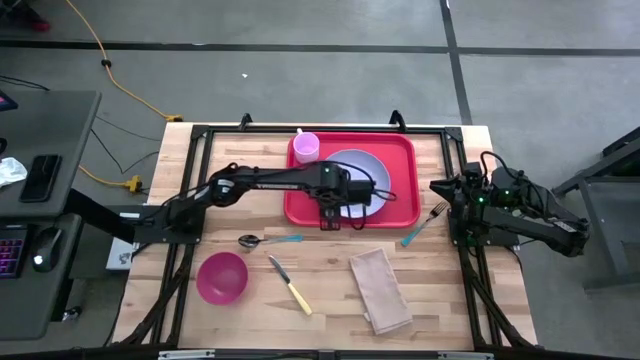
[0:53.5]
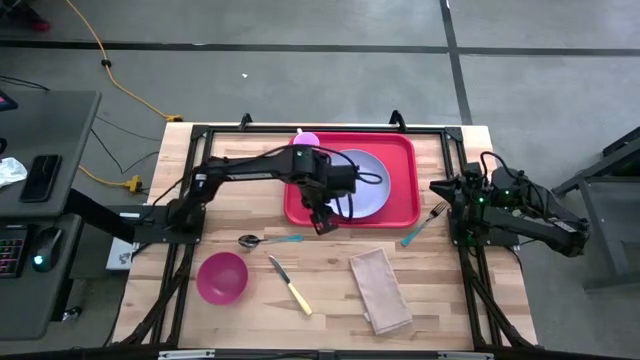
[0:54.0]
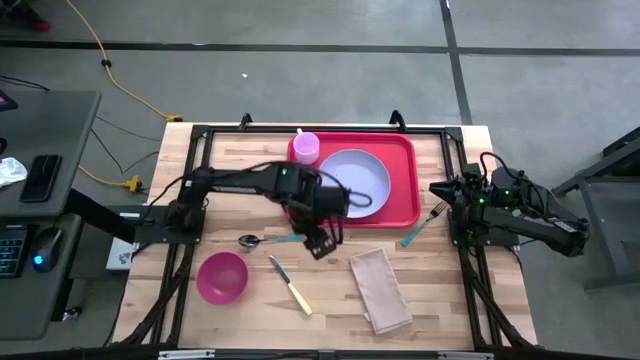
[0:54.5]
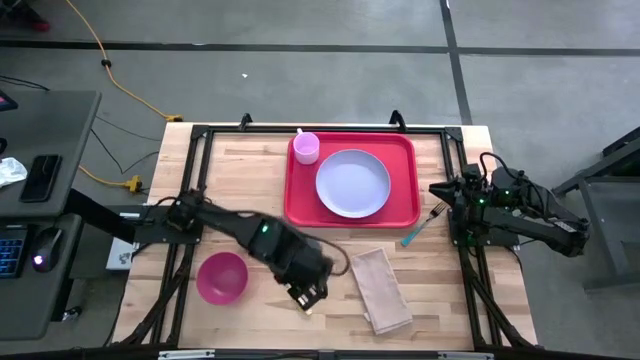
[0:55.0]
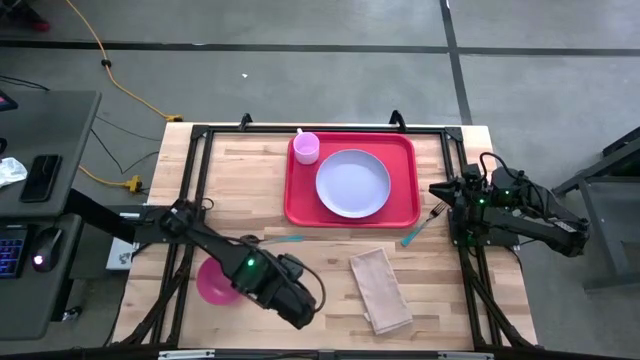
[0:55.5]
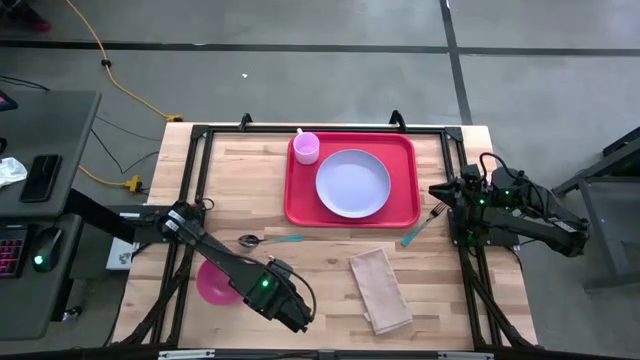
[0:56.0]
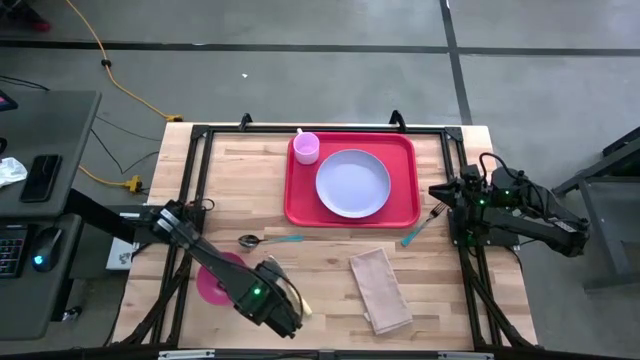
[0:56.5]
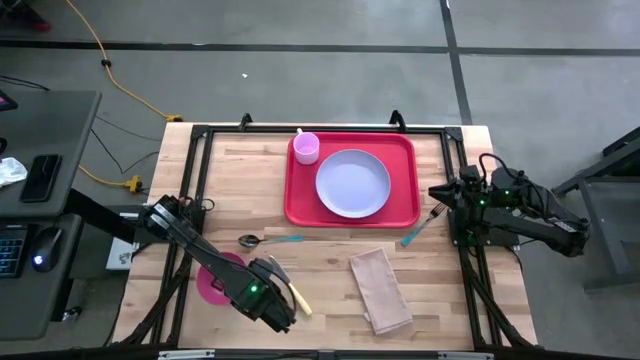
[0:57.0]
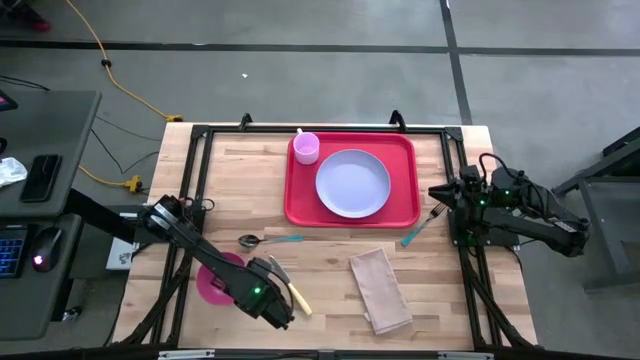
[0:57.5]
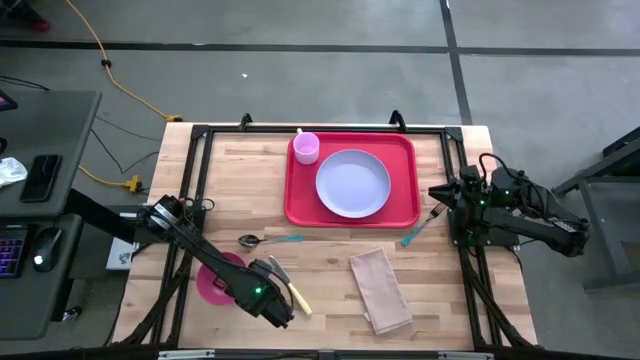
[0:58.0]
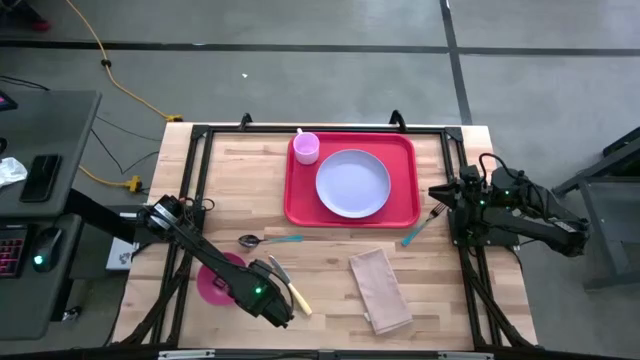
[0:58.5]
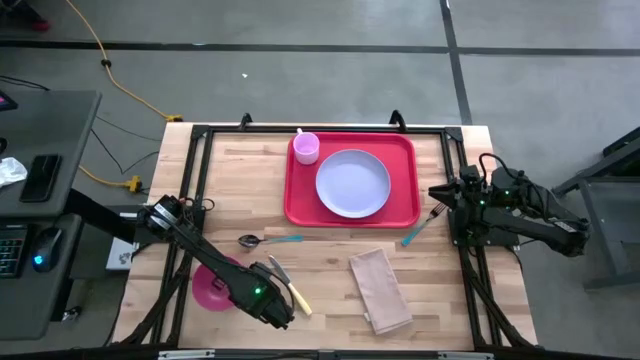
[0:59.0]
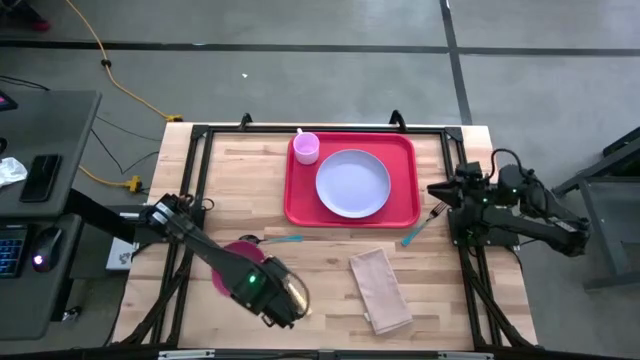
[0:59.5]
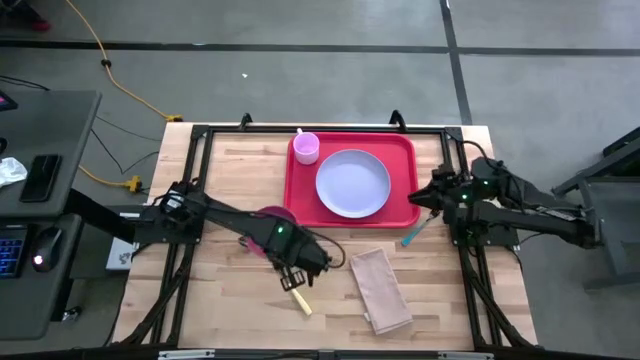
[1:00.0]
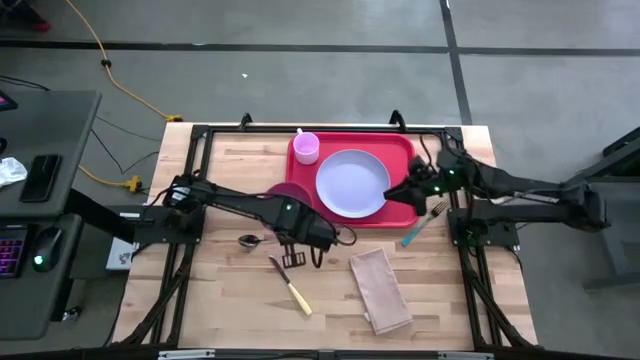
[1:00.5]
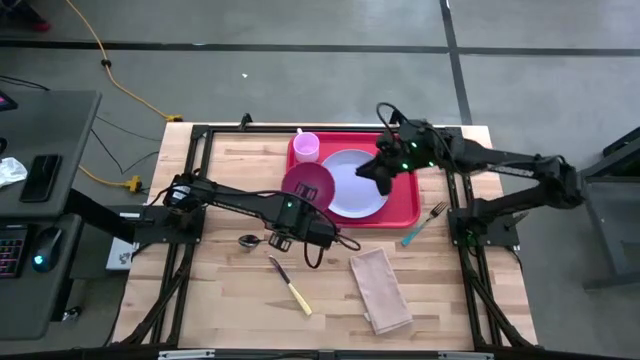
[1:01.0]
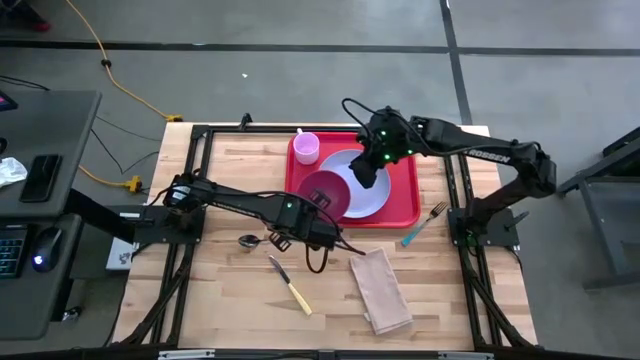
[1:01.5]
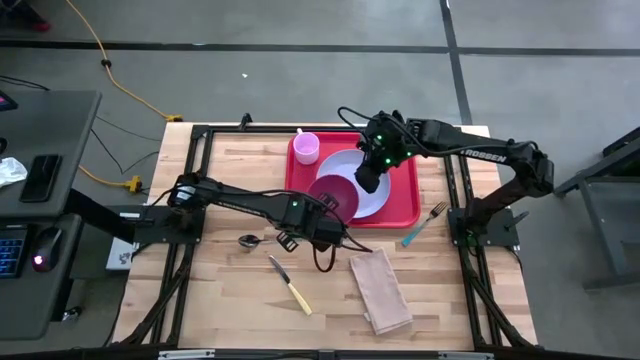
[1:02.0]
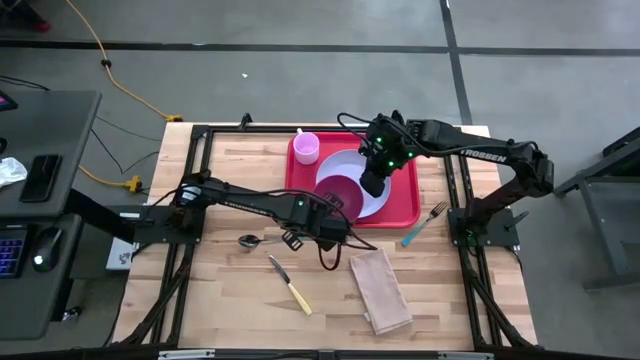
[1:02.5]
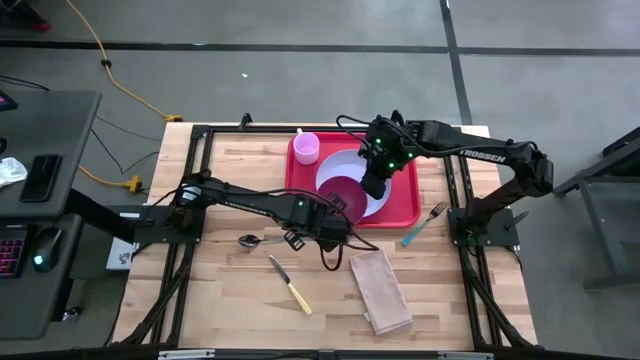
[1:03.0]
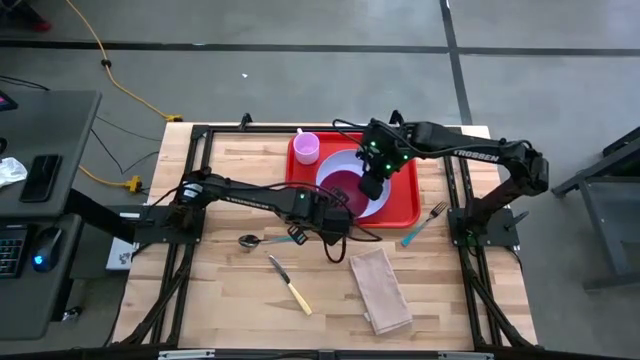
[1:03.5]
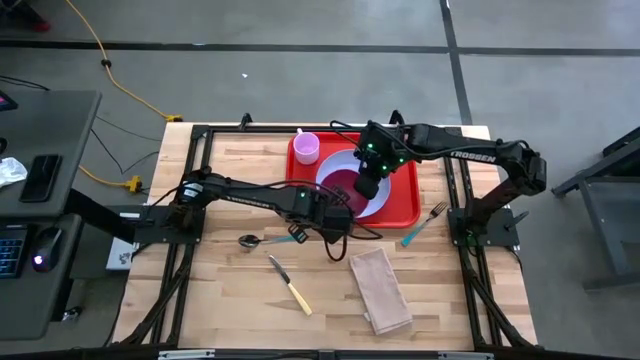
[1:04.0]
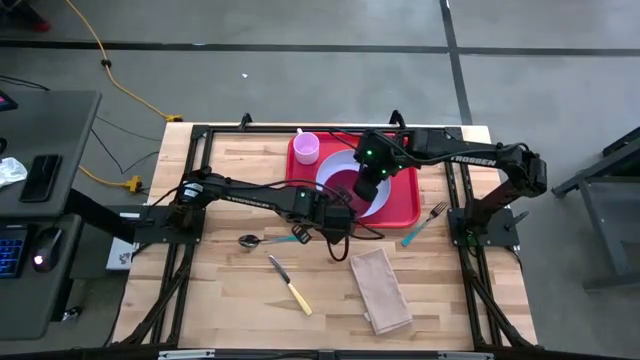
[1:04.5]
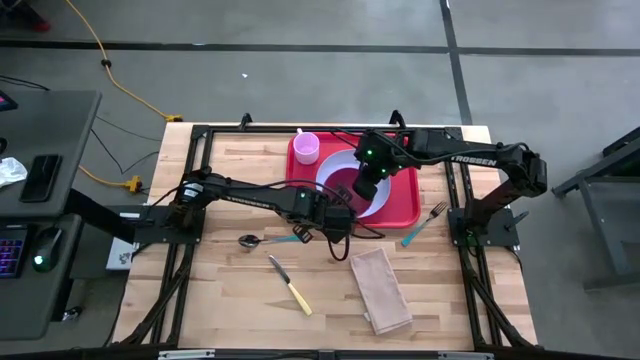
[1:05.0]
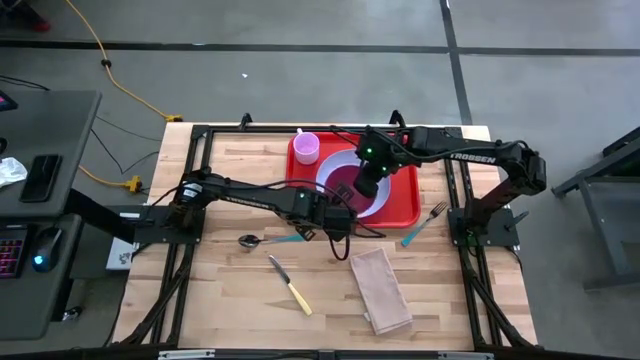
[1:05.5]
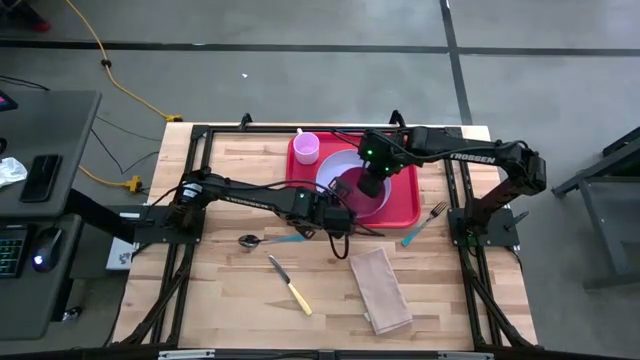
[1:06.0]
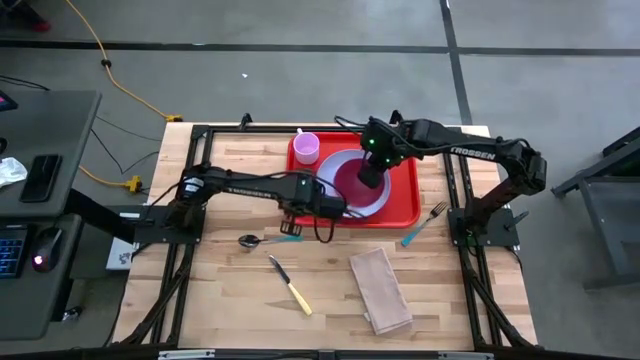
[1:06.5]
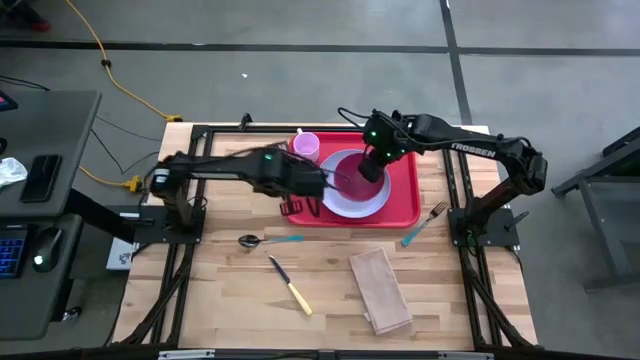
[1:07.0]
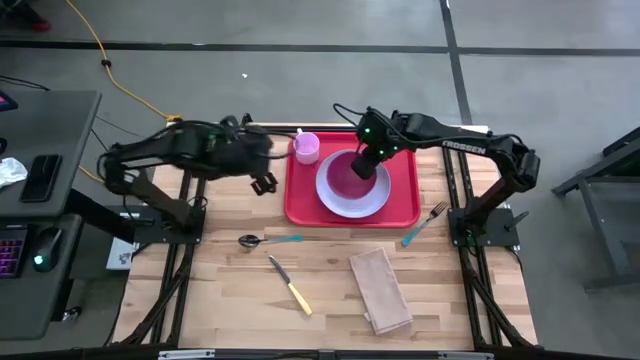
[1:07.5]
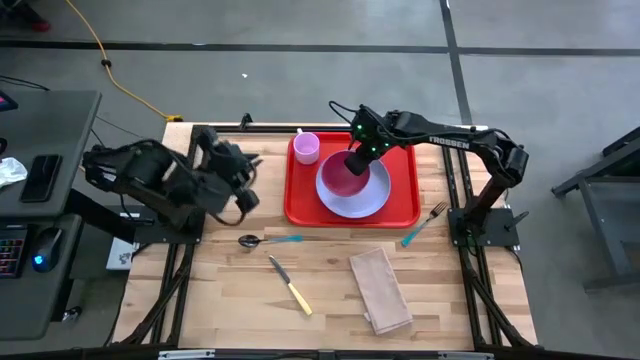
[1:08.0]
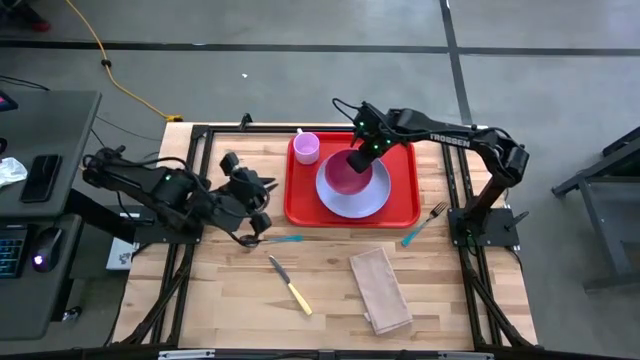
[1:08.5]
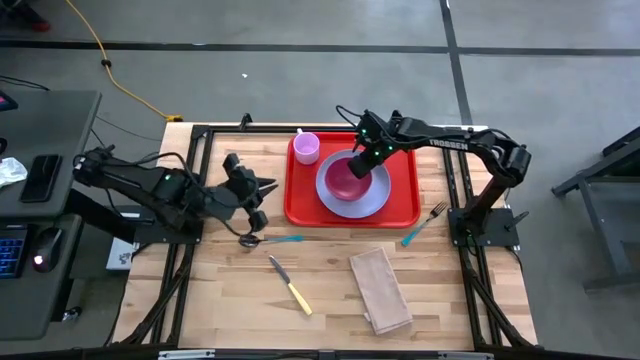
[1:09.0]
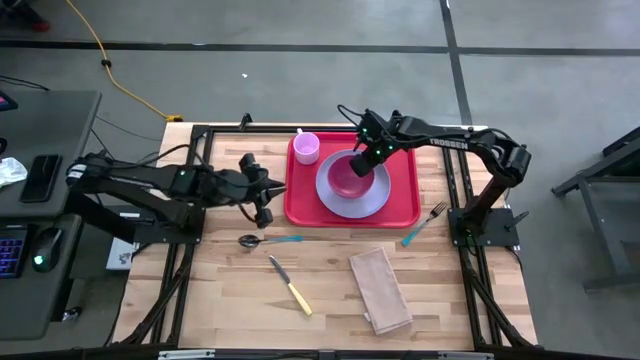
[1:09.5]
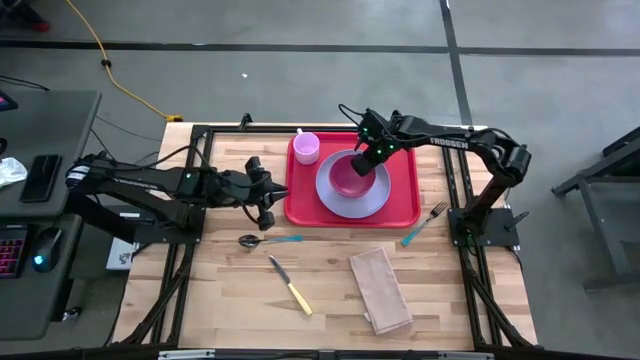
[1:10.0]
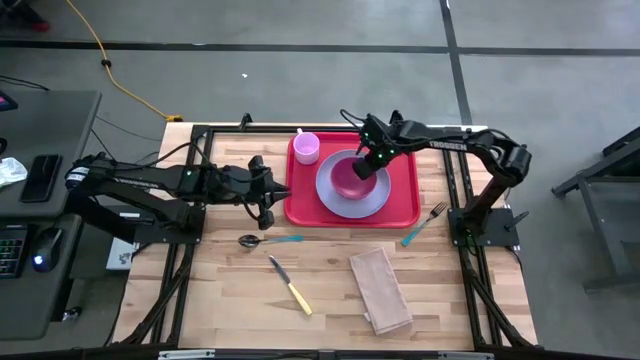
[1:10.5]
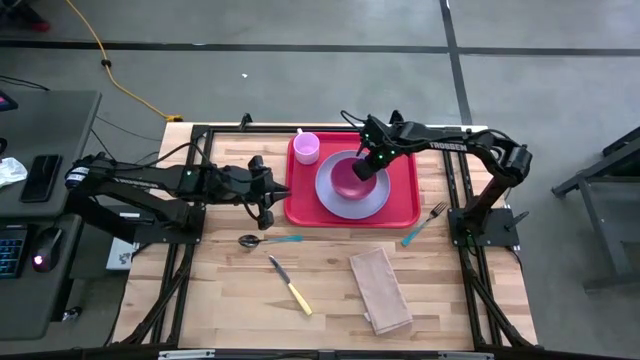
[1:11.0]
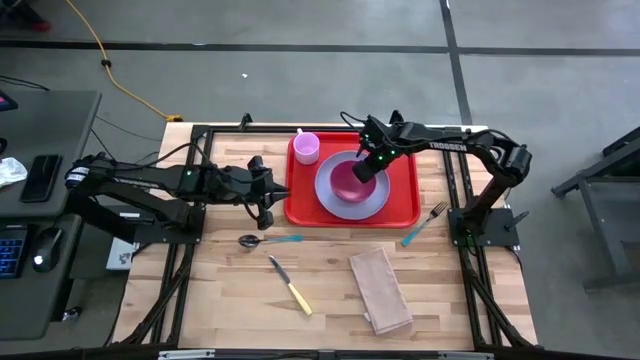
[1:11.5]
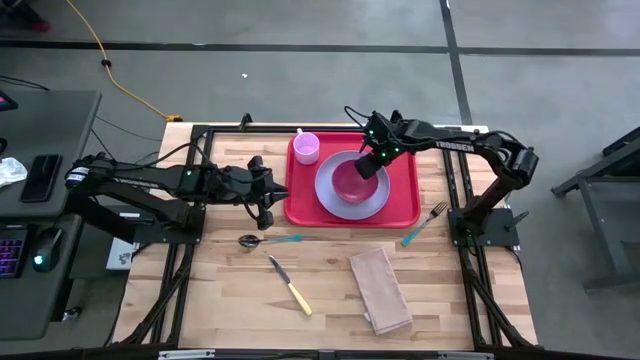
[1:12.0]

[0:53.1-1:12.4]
Task: Set up tray
Put the pink bowl on top of the purple plate on the red tray

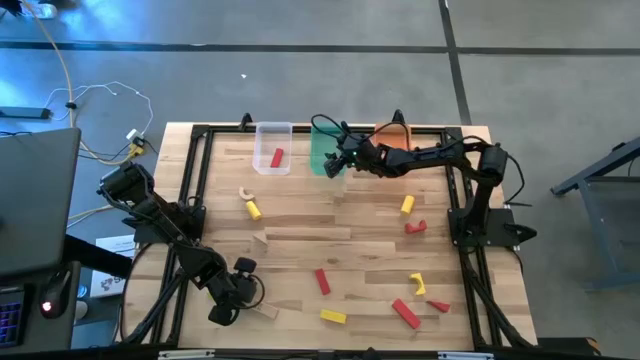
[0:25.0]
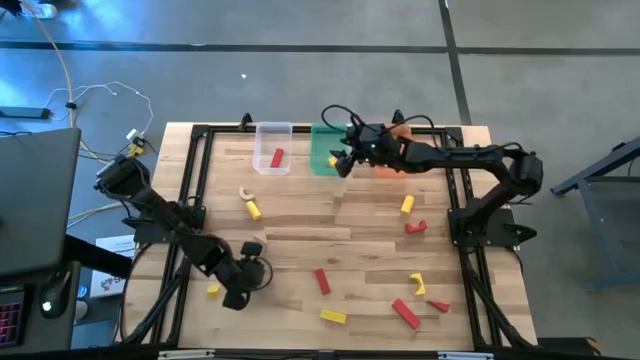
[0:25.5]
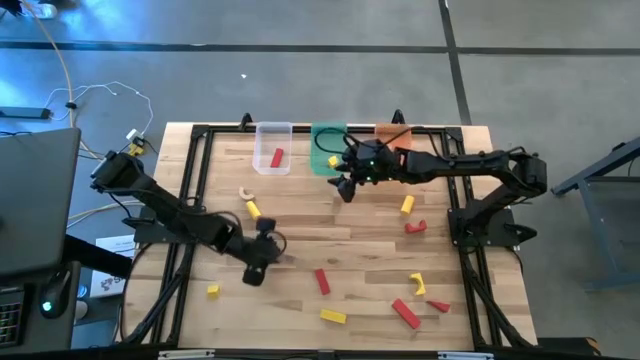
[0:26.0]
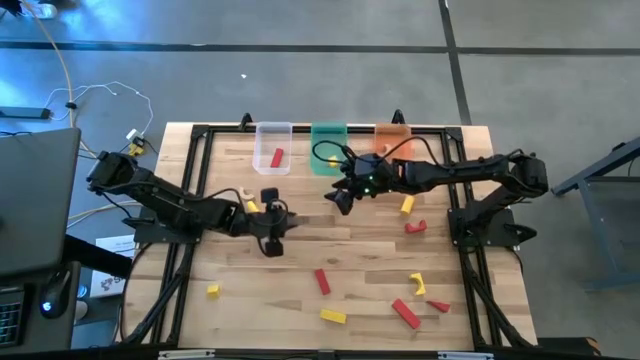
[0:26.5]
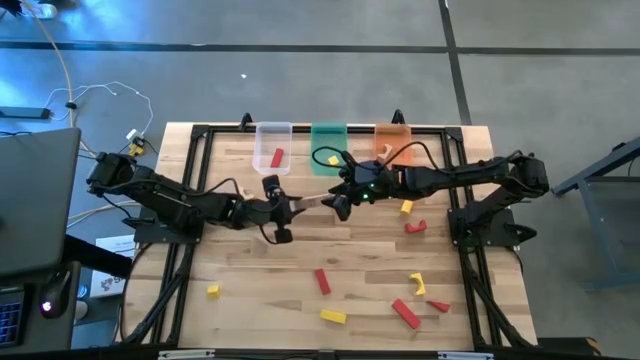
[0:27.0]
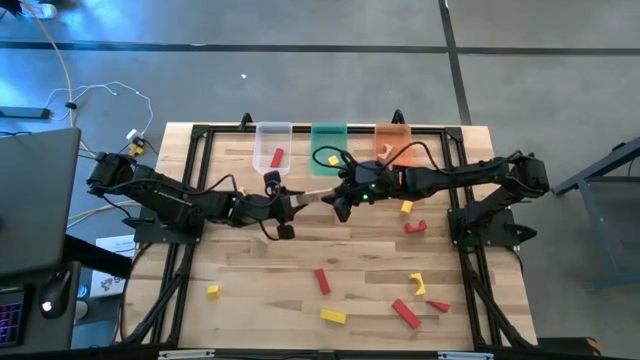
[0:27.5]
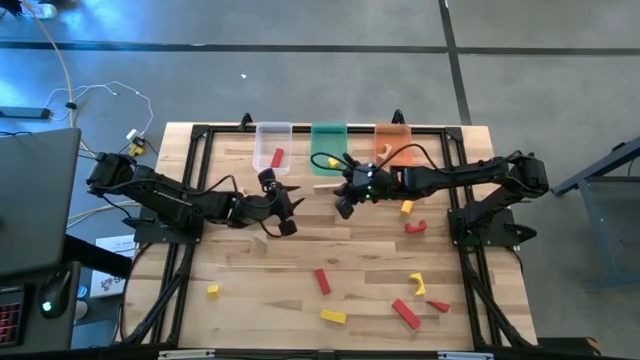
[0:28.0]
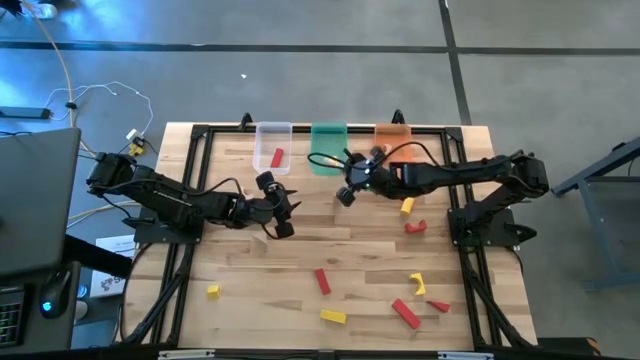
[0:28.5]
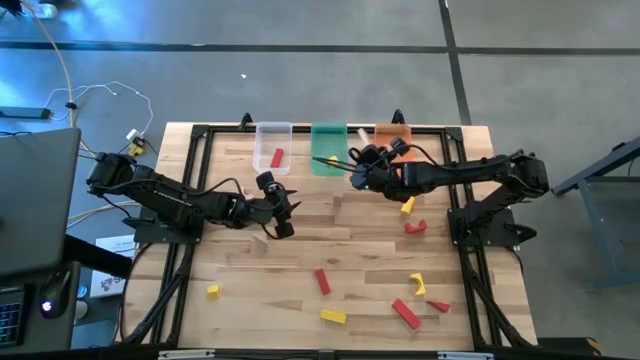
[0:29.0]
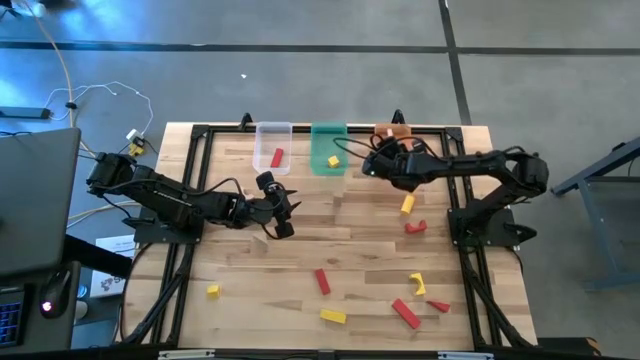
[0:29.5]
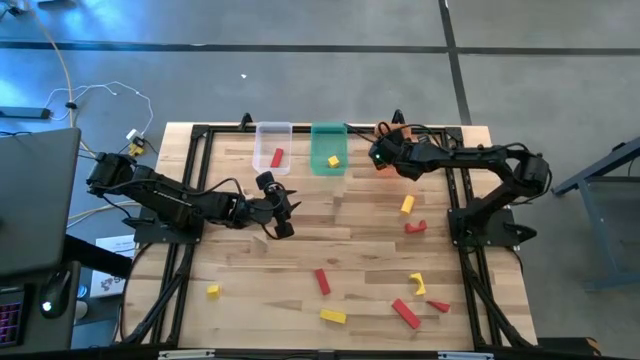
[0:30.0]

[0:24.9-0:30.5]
Task: Sort & place blocks by color
Put the brown block into the orange bin
